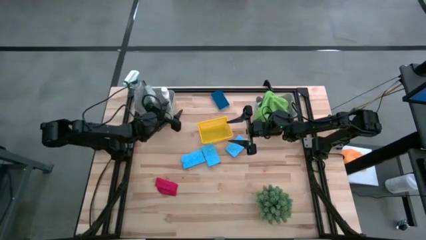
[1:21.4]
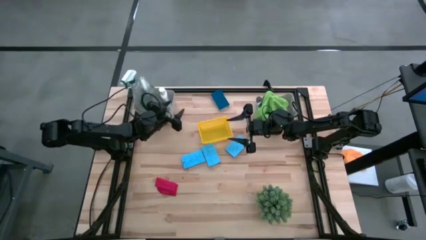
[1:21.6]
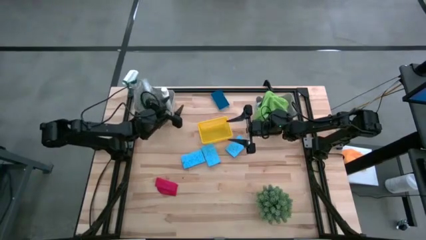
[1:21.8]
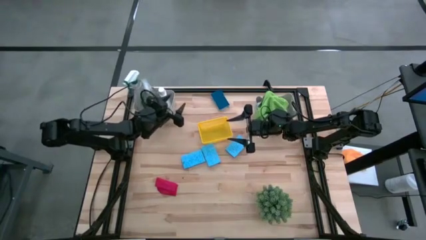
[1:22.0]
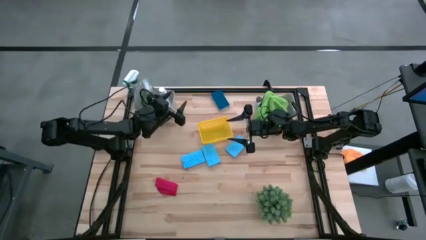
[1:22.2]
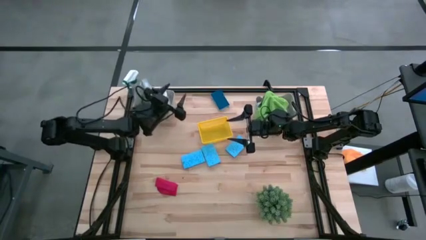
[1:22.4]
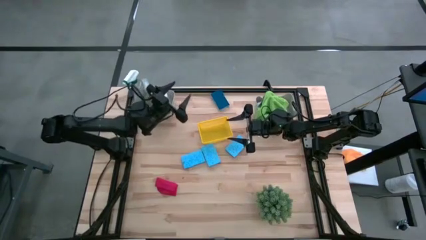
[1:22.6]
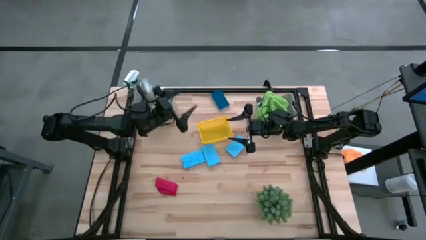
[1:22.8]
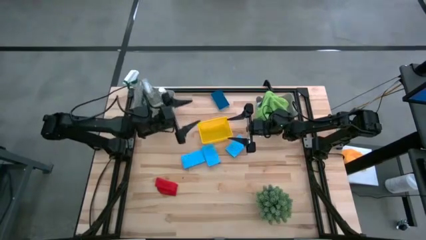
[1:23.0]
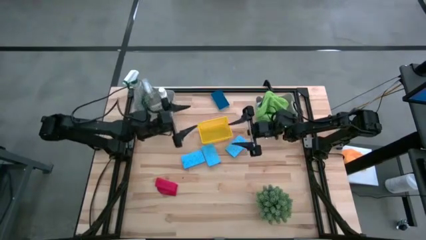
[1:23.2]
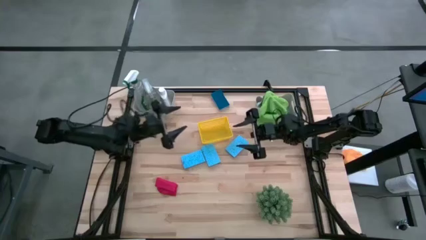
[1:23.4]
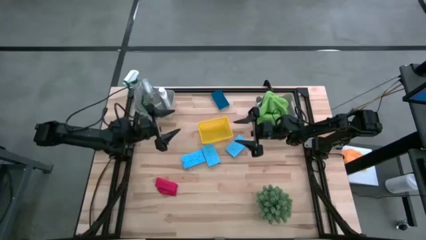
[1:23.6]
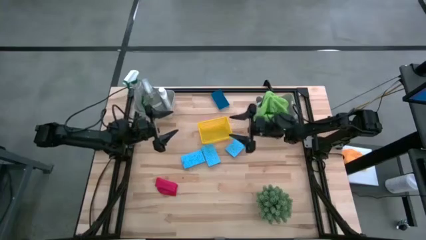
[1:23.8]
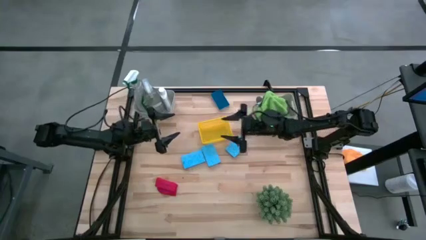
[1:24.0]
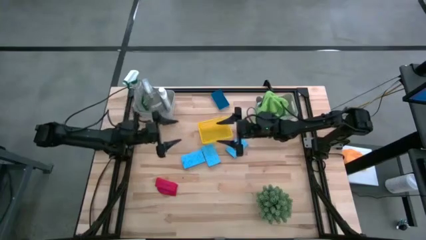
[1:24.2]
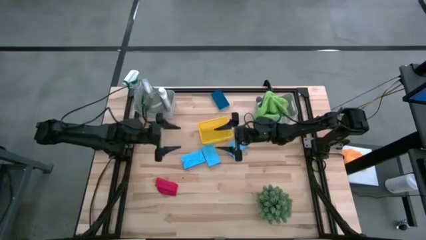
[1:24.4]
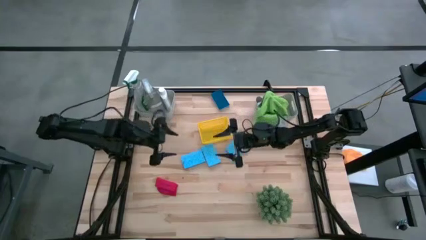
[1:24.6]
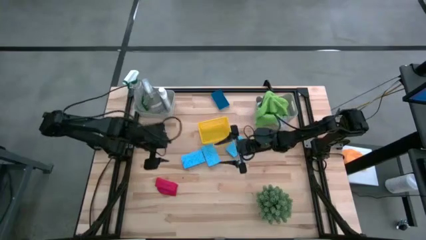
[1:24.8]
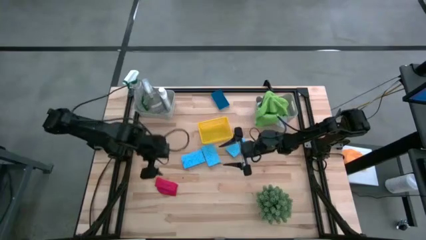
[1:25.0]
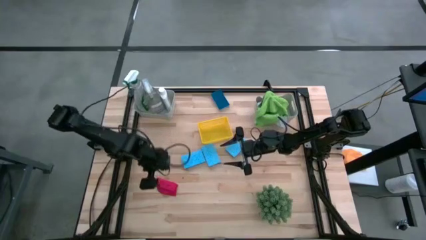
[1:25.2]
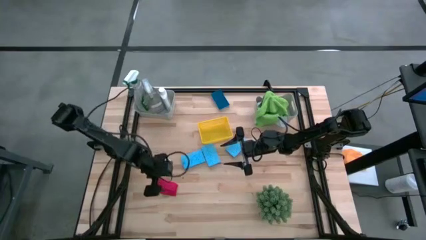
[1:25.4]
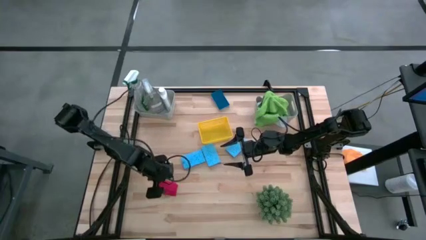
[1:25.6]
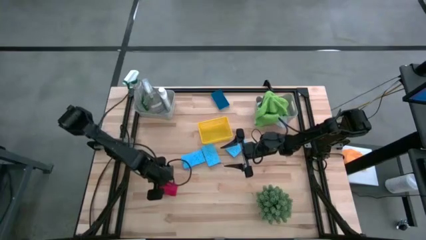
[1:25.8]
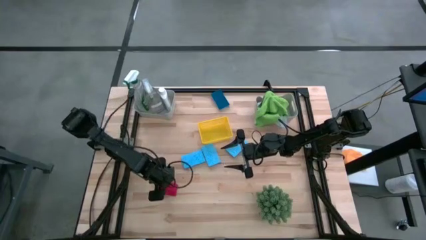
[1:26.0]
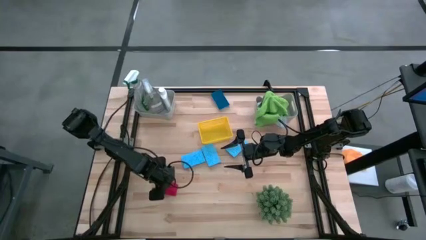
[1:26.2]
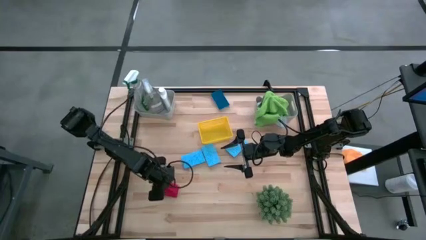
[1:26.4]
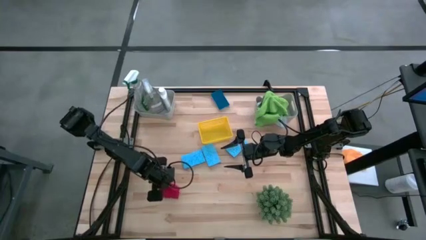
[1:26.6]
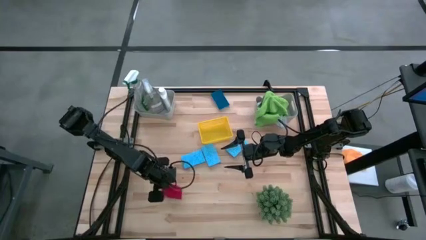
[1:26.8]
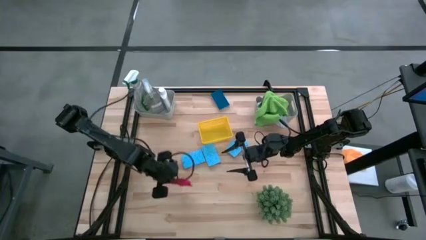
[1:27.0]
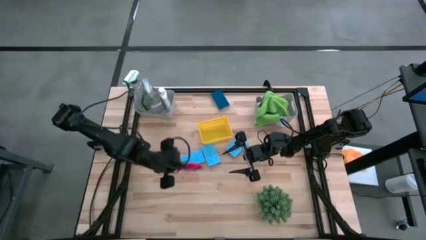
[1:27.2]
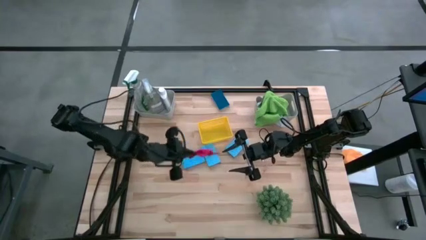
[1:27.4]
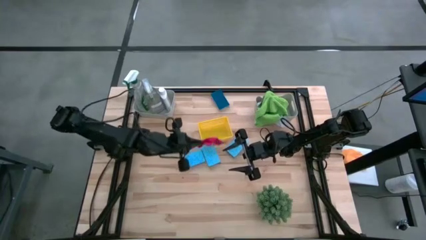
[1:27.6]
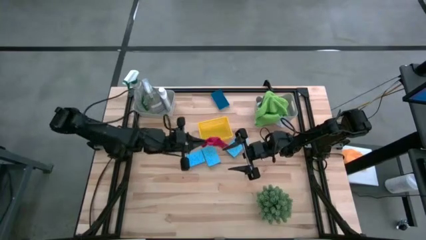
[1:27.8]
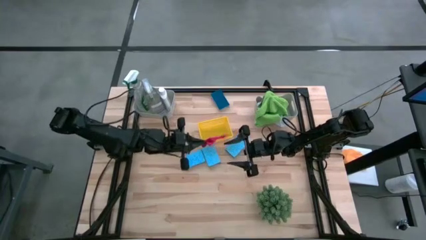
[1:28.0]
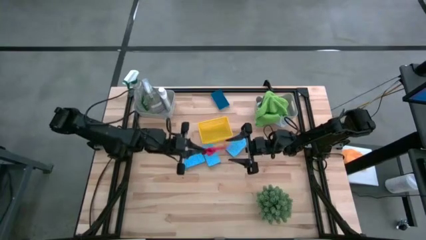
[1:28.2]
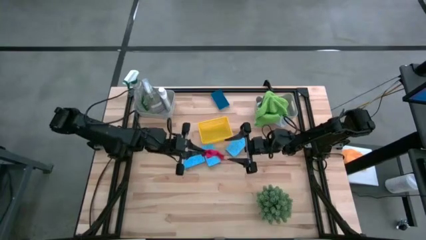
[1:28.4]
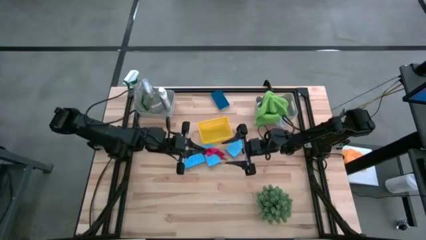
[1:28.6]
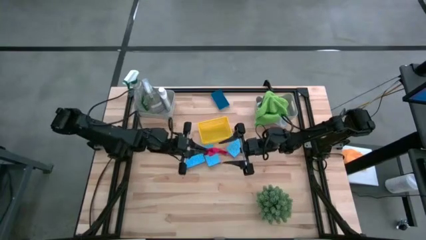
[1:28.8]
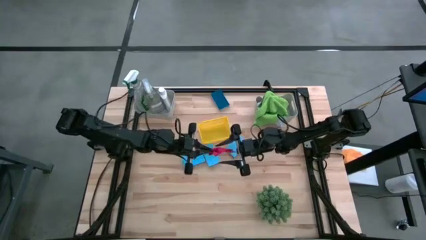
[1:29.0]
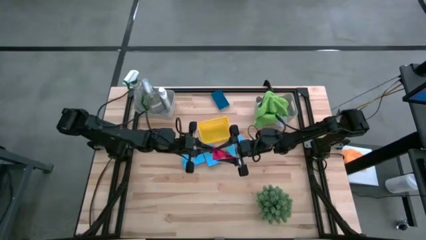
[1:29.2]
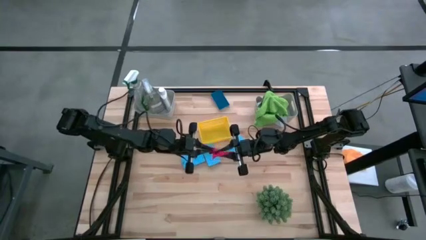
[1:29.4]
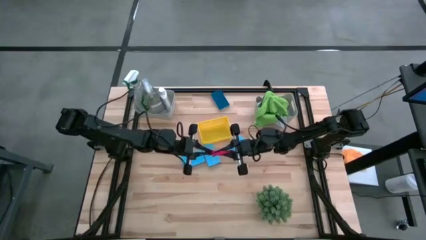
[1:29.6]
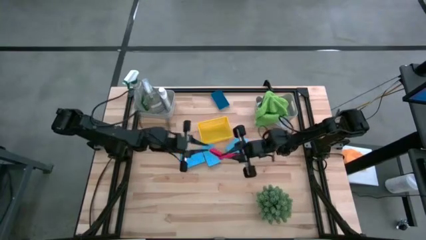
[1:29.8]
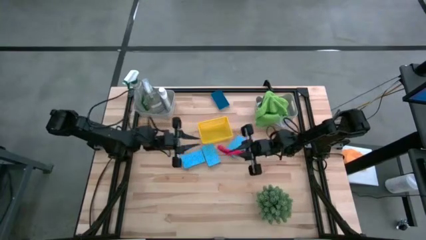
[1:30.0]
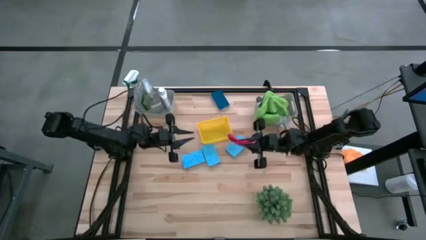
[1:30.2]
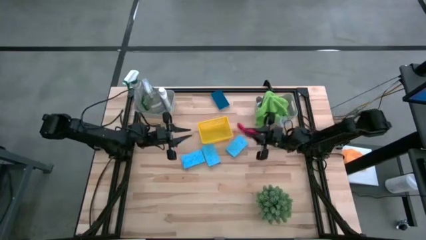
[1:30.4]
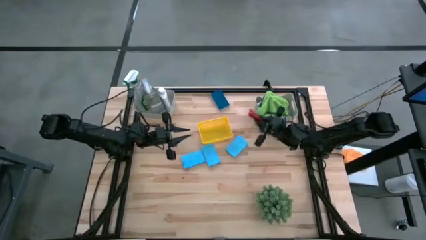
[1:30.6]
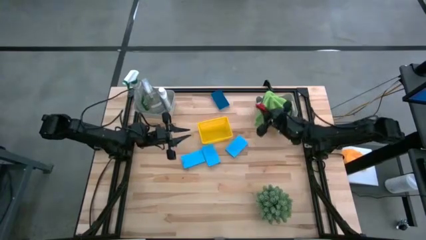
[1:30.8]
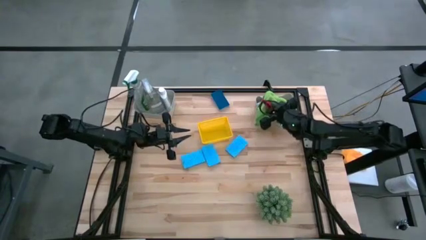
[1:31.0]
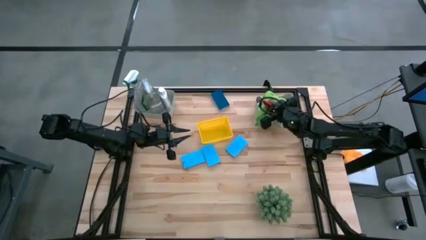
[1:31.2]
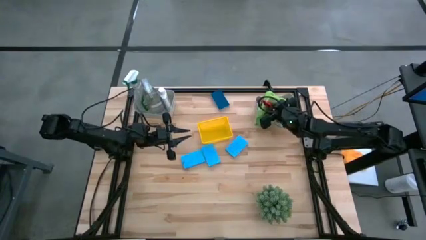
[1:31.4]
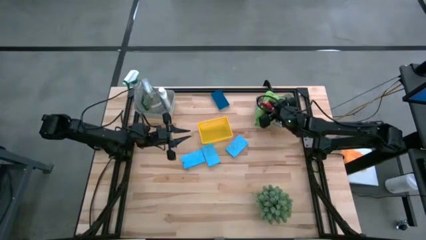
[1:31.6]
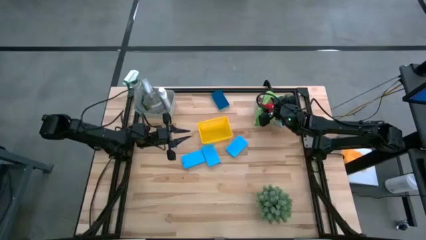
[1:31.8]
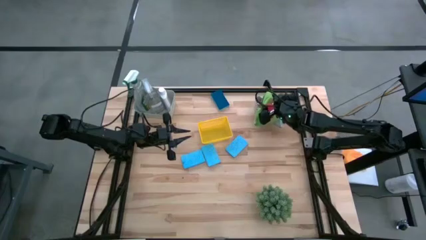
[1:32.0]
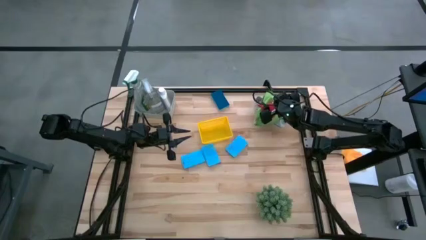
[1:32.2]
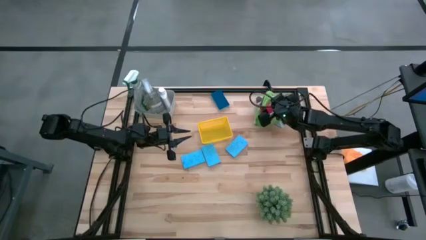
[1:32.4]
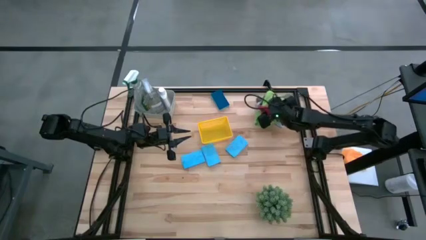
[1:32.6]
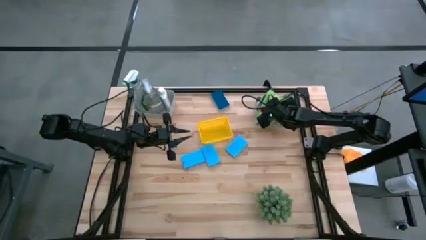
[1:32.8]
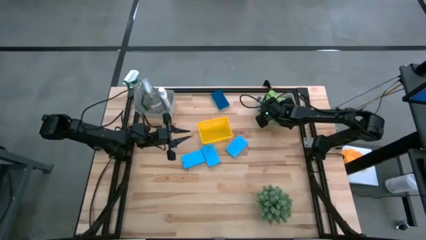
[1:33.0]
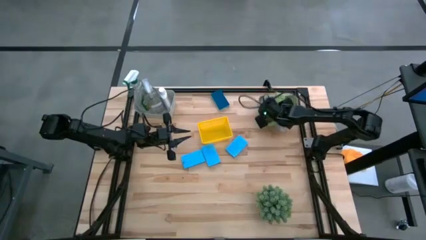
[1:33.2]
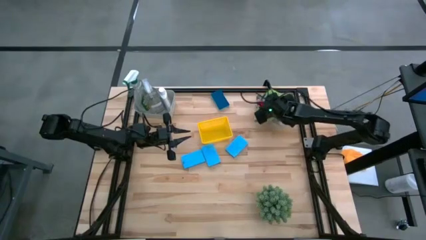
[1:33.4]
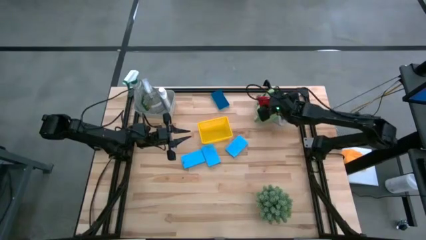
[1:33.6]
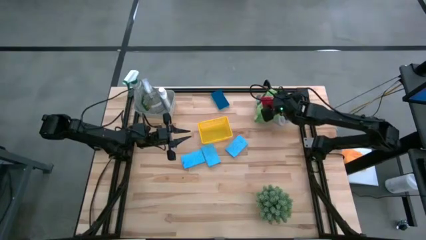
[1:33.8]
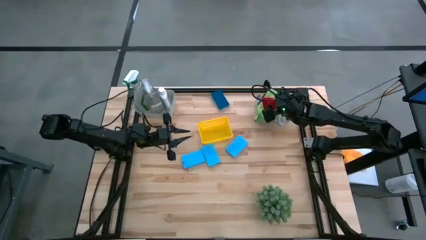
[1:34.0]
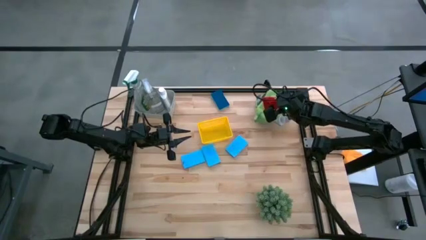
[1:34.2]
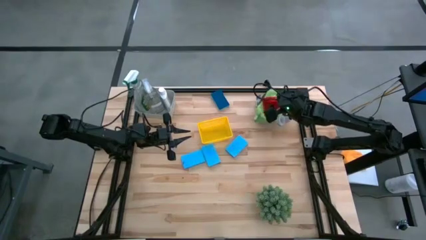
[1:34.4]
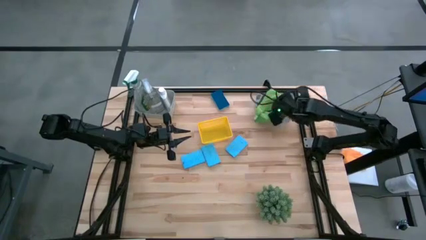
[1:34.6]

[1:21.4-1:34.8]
Task: Pick & Place Kitchen Items
Put the red microfiber towel into the right gray bin
